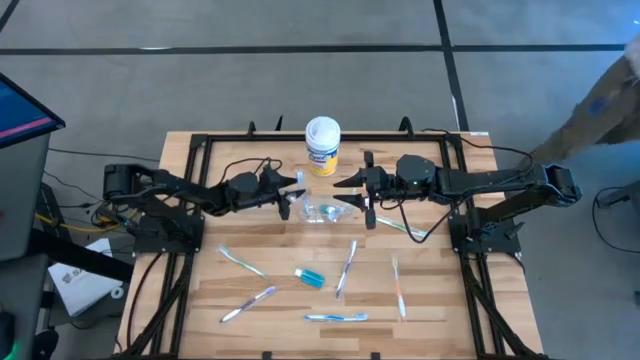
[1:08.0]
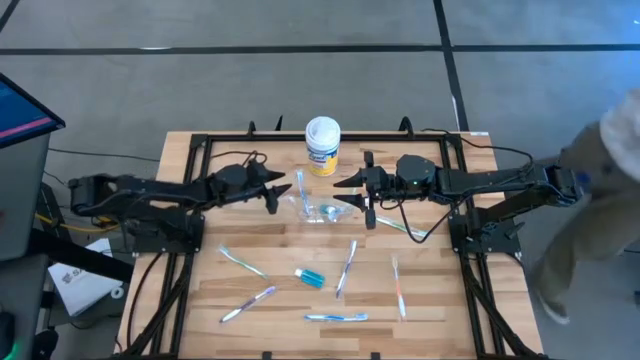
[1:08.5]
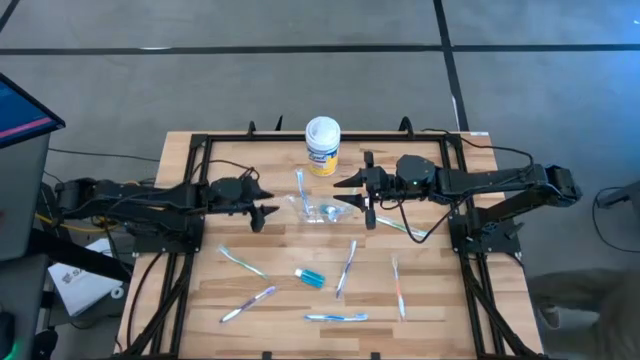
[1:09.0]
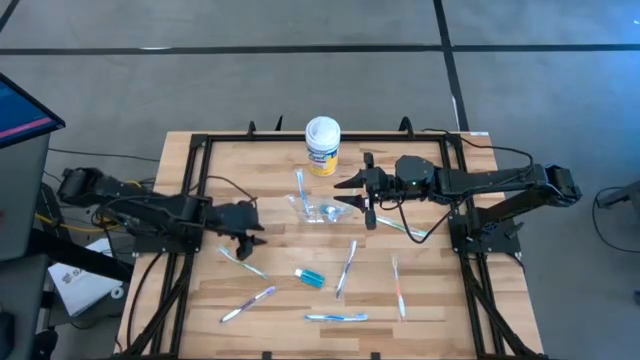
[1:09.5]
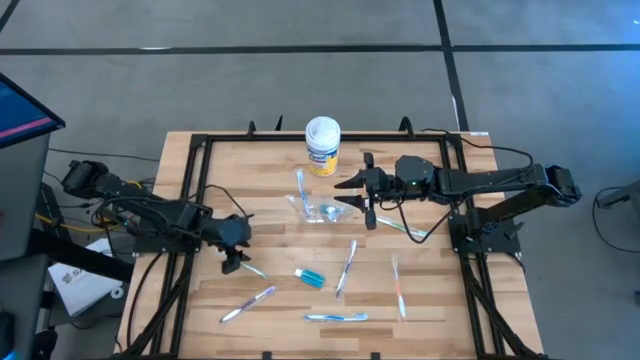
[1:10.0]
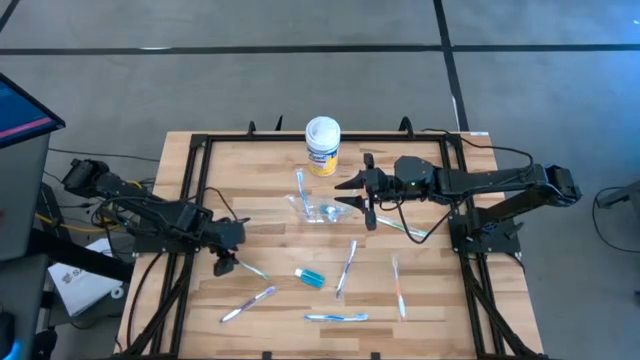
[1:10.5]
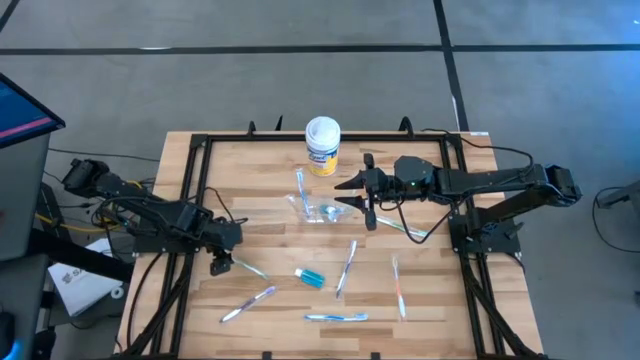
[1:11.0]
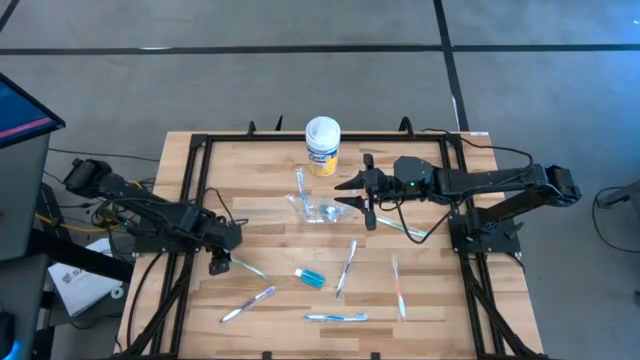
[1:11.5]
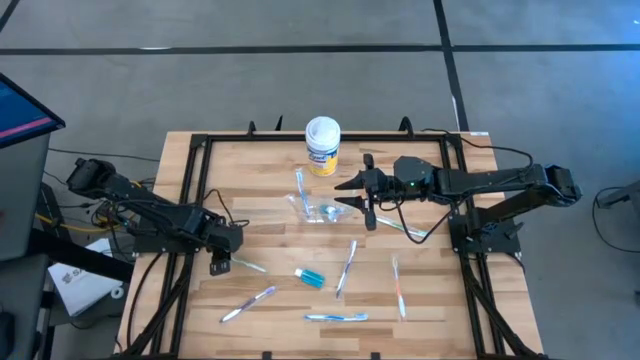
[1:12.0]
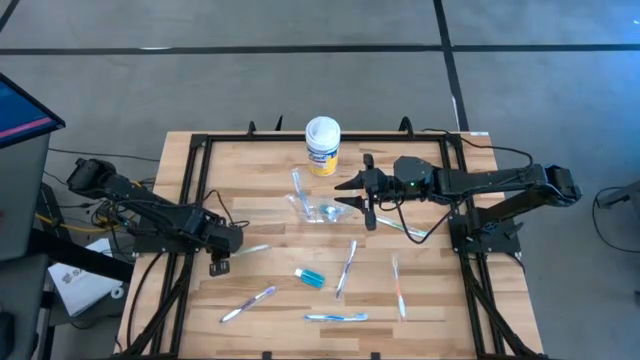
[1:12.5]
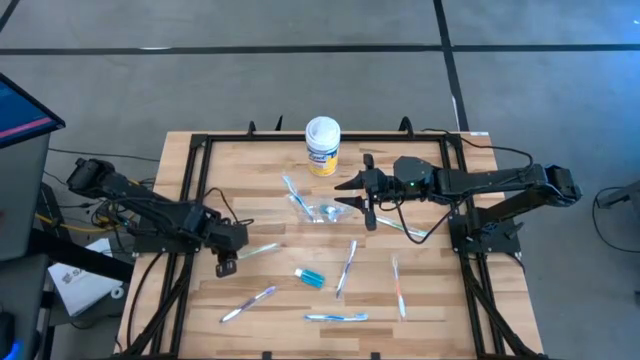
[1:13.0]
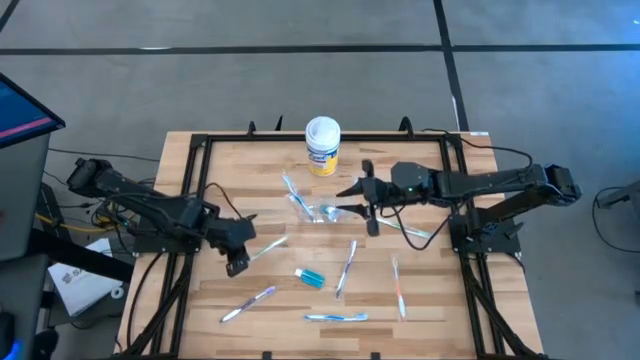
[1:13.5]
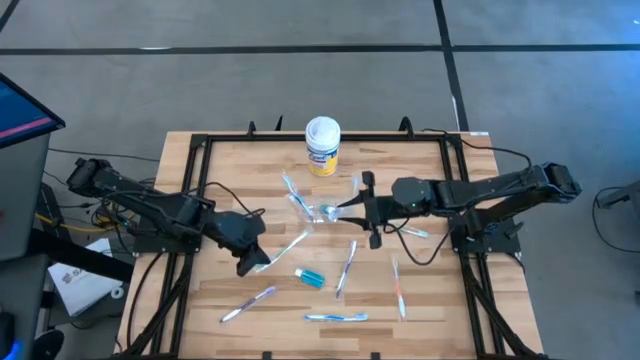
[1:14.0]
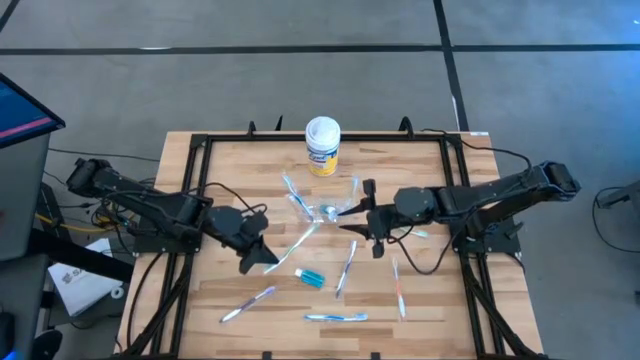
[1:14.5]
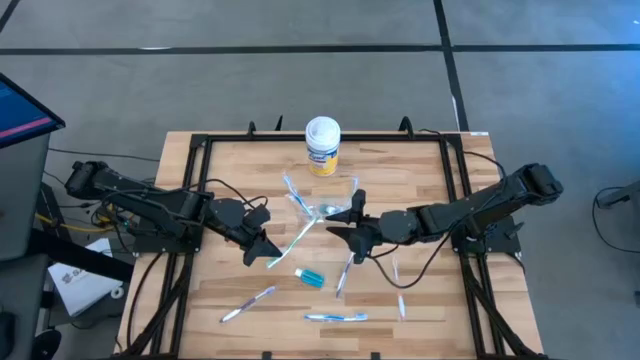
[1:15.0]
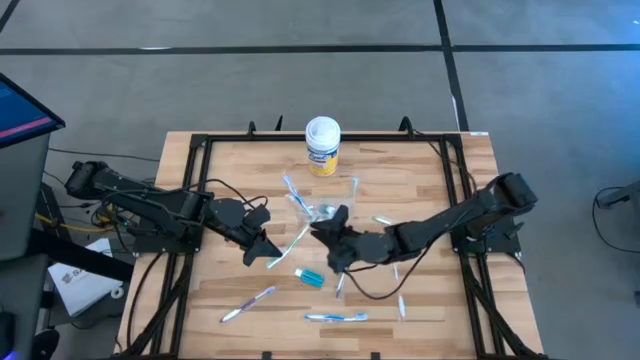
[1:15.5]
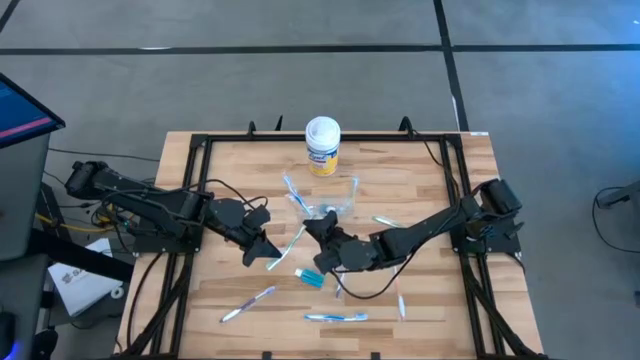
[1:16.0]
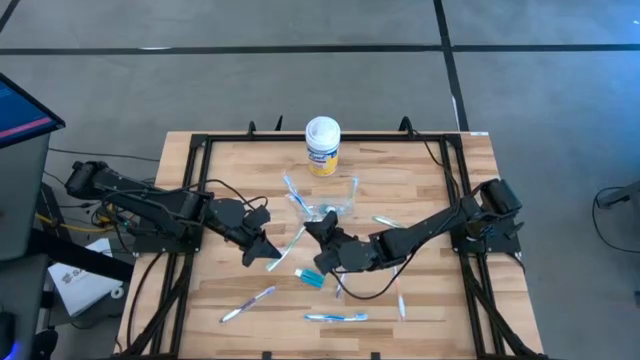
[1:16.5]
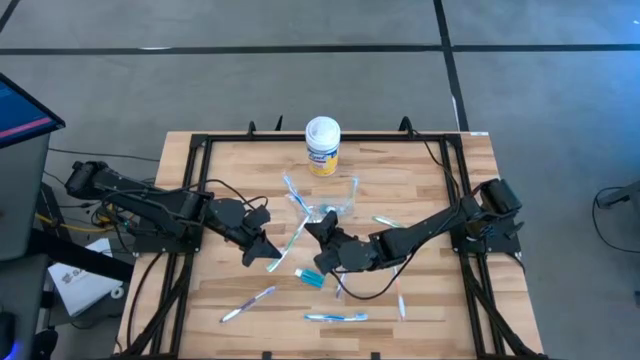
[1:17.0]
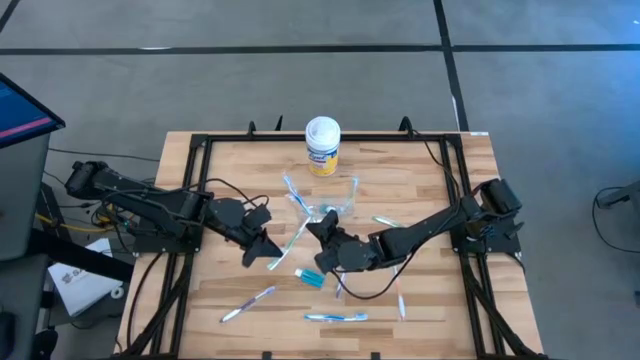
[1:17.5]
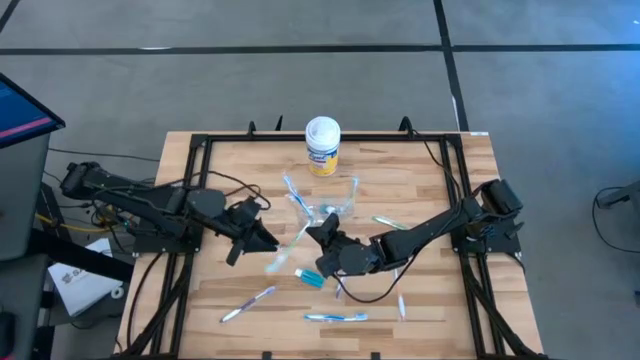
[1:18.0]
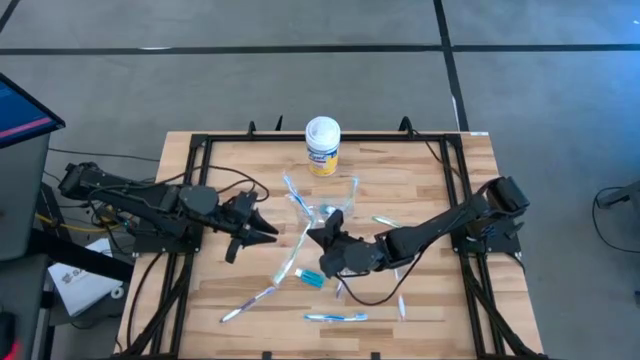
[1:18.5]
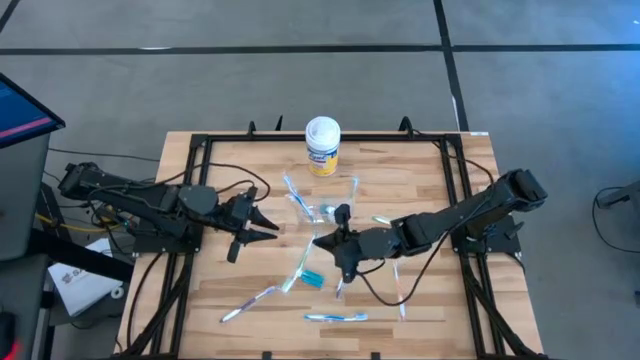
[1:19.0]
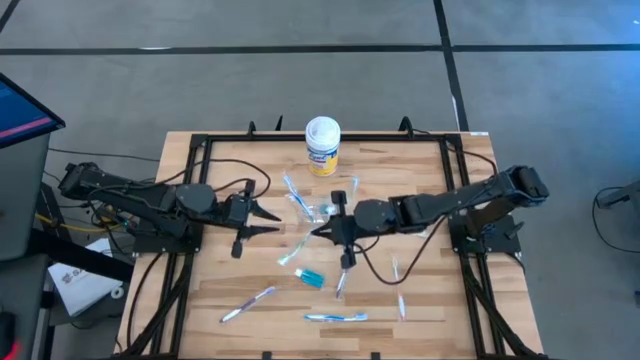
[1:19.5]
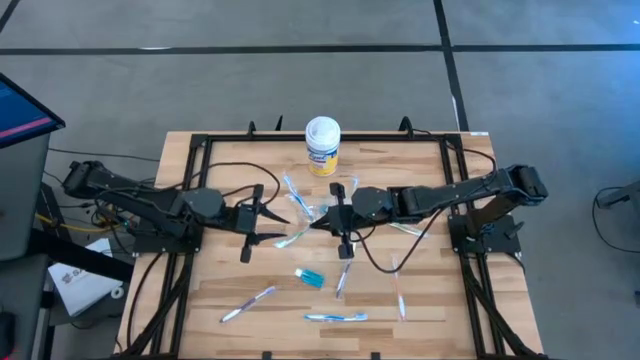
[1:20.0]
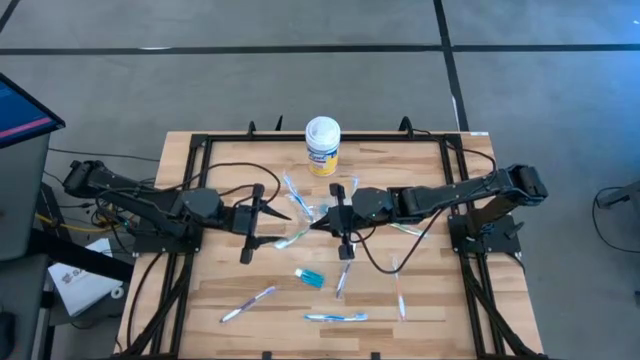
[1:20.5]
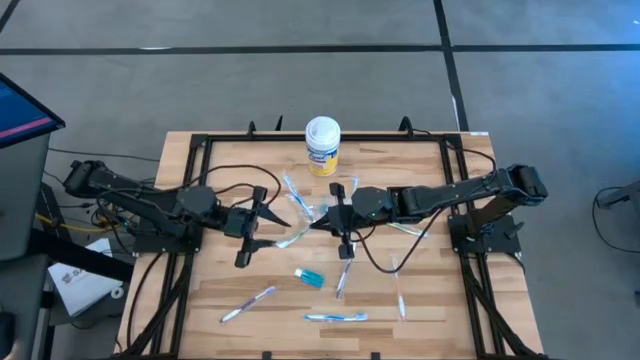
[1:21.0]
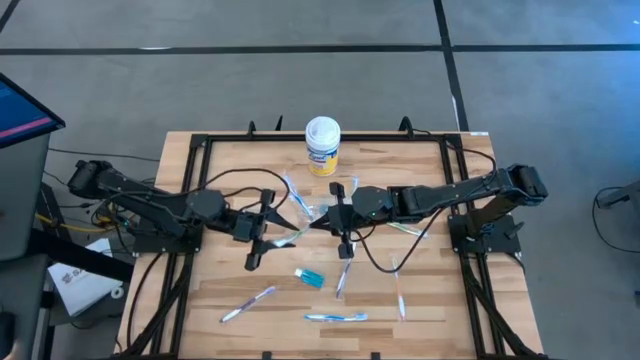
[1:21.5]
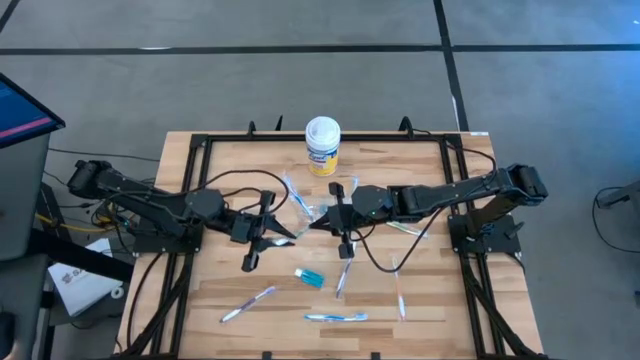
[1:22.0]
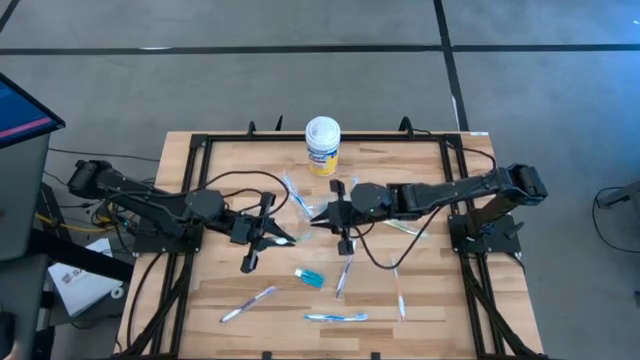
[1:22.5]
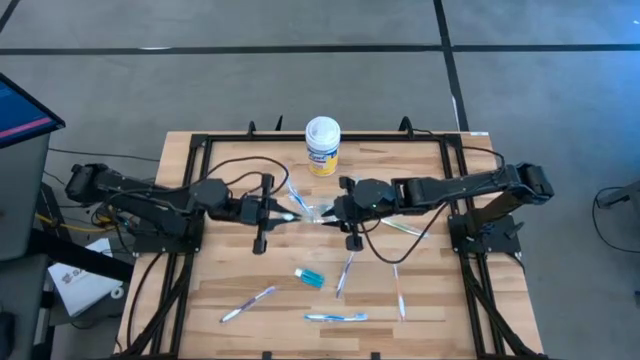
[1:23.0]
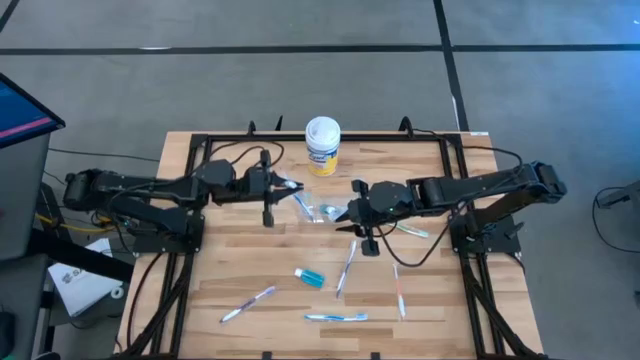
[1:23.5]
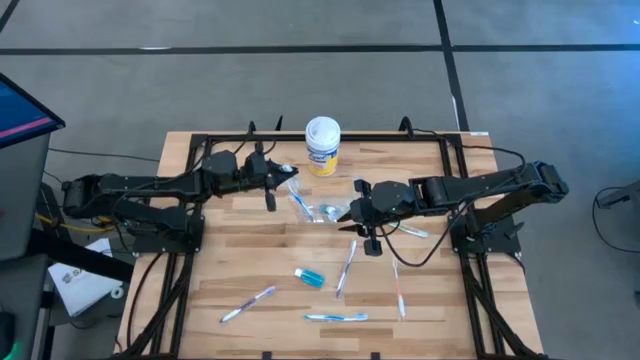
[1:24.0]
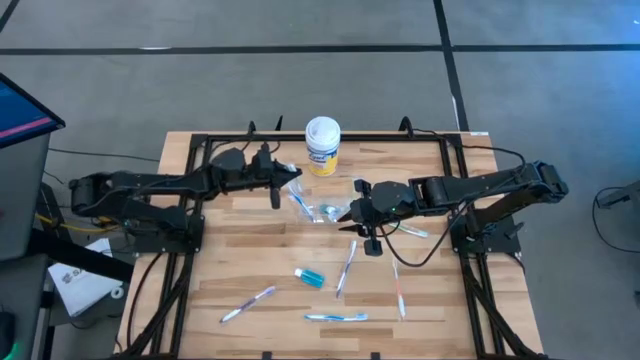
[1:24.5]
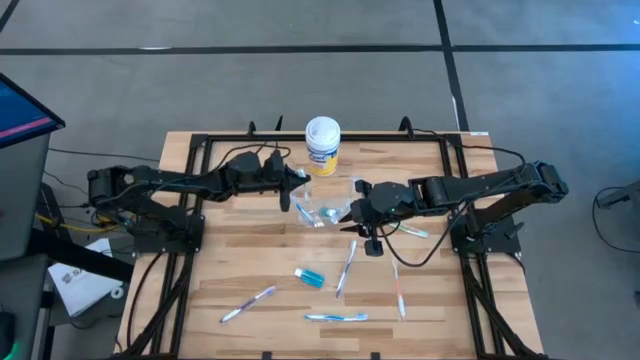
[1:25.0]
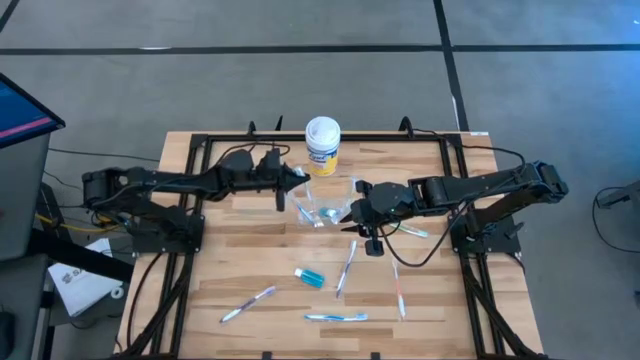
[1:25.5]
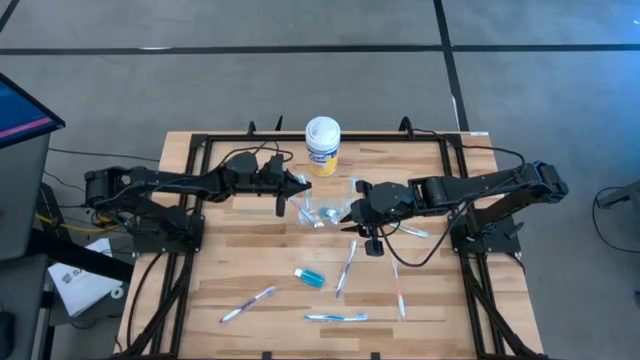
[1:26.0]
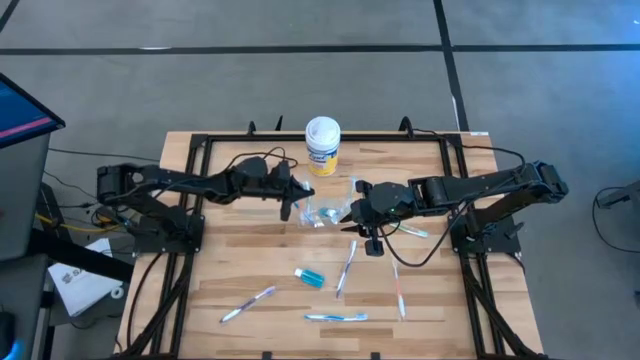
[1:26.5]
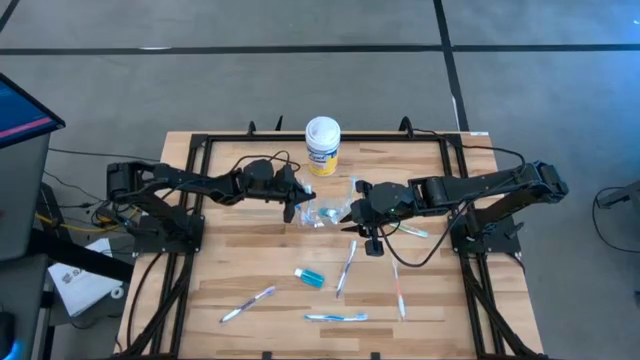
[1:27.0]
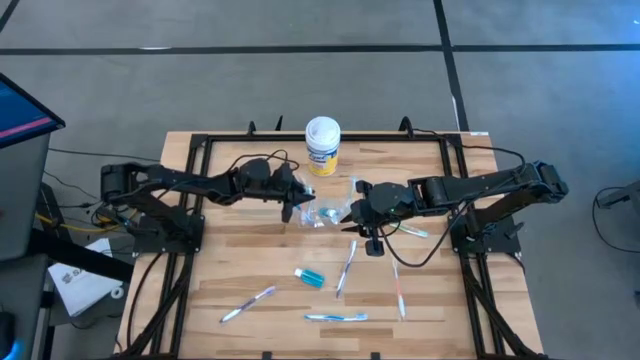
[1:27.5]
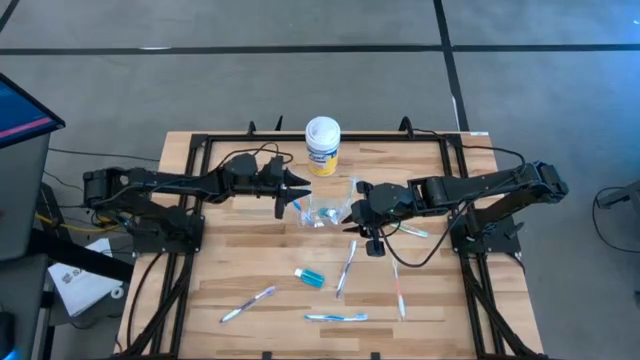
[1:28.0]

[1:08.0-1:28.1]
Task: Pick & Place toothbrushing station
Put the bottom green toothbrush into the transparent organizer

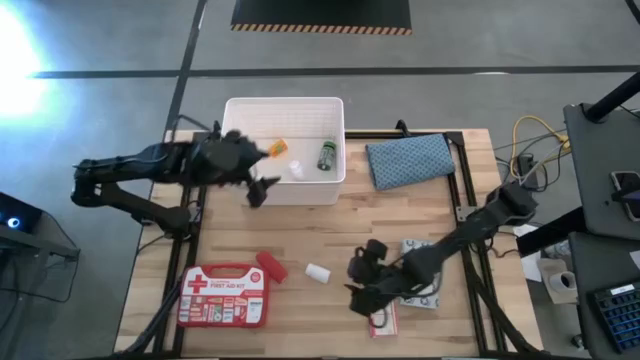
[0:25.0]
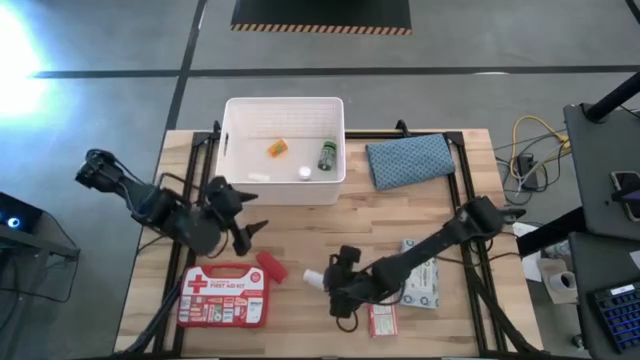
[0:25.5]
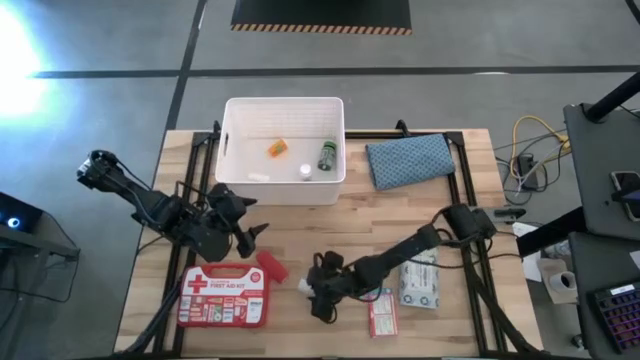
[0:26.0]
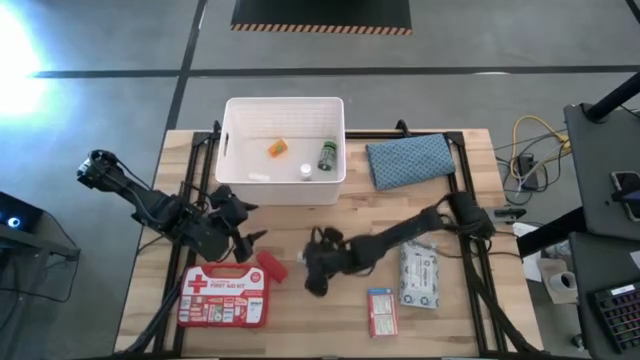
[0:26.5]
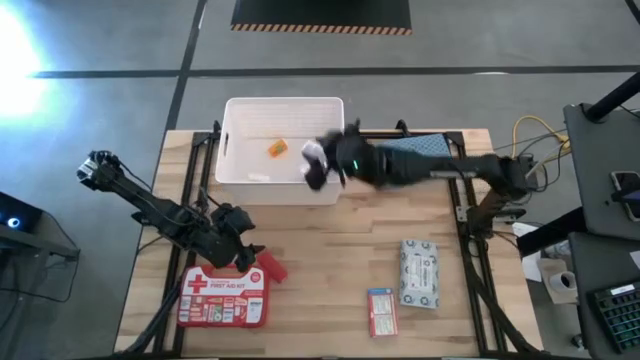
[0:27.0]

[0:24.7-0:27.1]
Task: Pick & place medical supplies in basket/bin
Put the white pill bottle into the white bin
